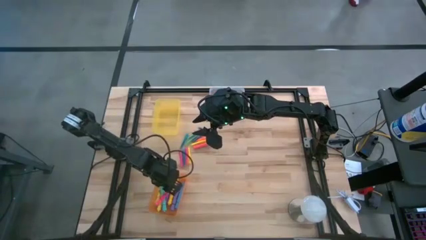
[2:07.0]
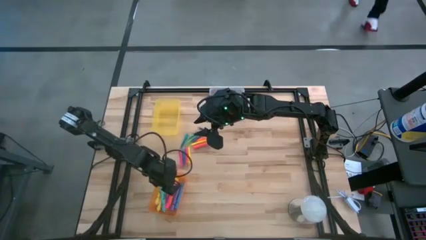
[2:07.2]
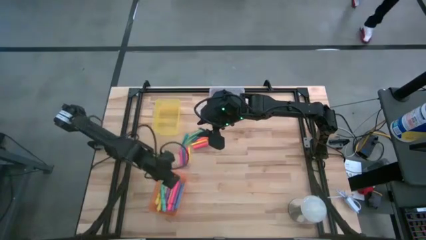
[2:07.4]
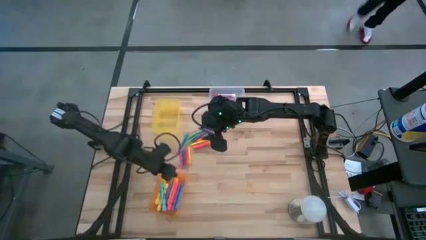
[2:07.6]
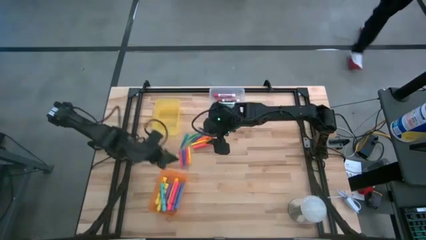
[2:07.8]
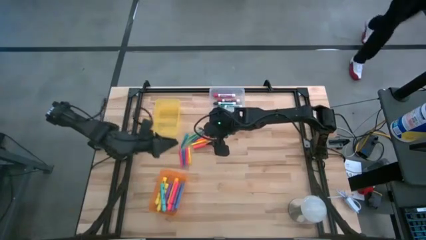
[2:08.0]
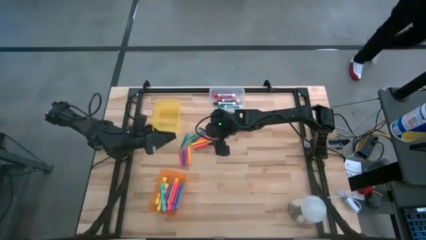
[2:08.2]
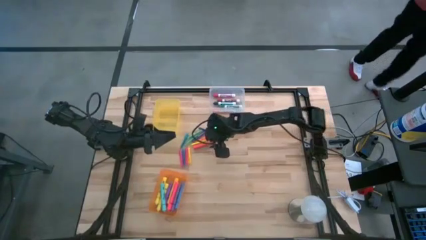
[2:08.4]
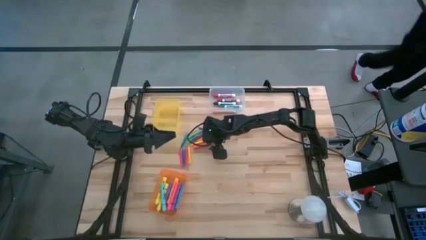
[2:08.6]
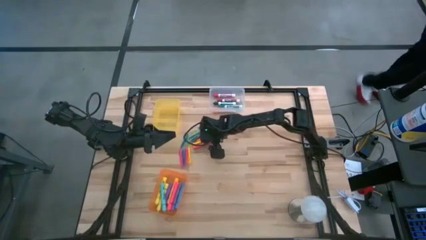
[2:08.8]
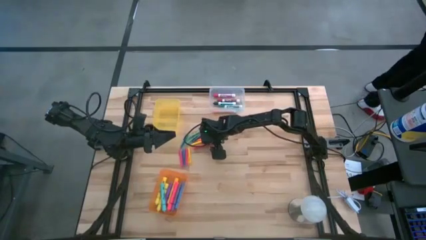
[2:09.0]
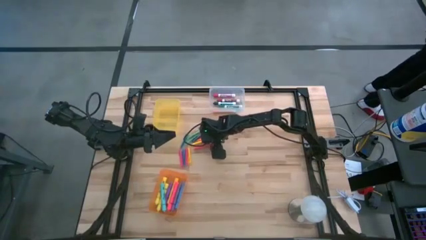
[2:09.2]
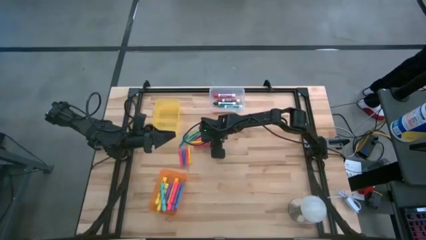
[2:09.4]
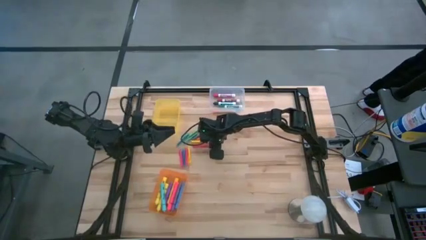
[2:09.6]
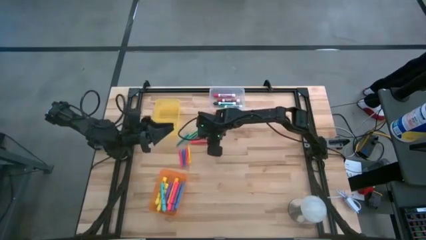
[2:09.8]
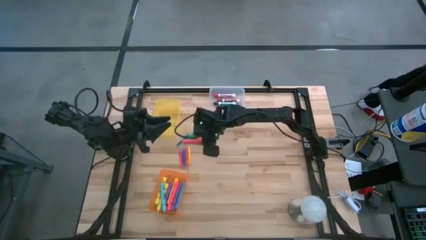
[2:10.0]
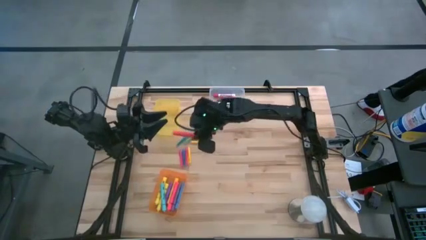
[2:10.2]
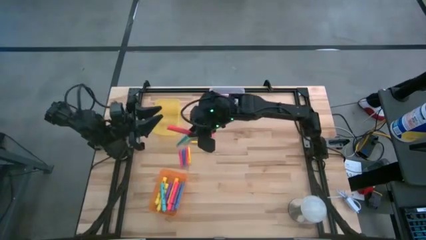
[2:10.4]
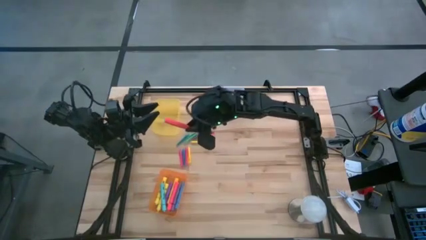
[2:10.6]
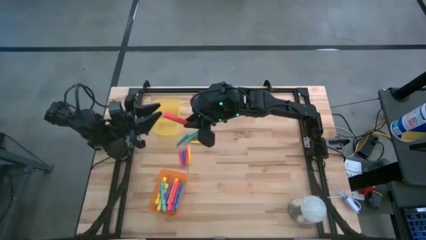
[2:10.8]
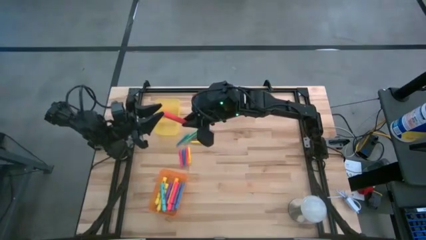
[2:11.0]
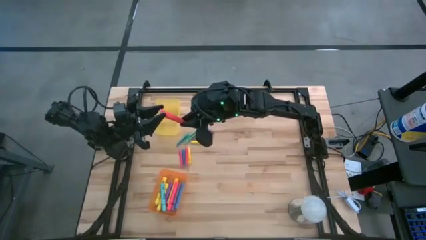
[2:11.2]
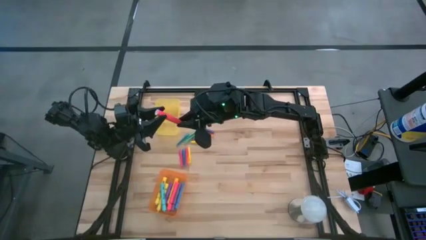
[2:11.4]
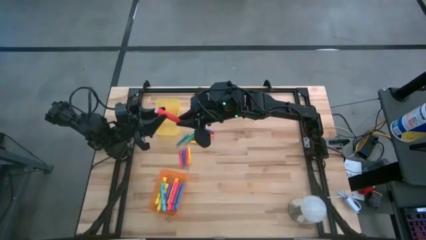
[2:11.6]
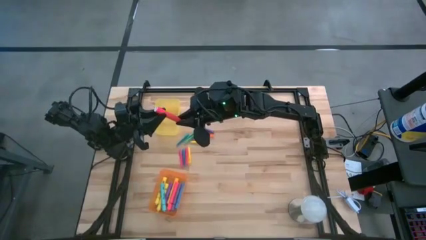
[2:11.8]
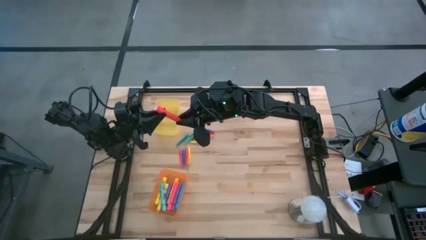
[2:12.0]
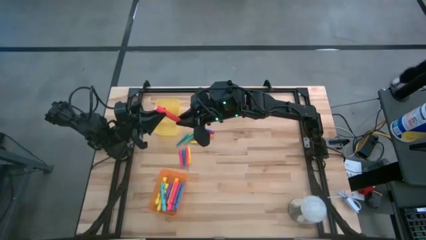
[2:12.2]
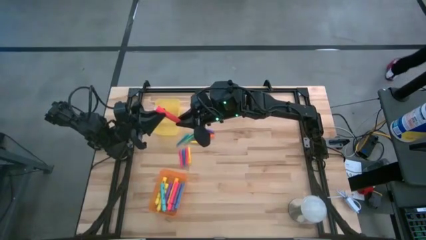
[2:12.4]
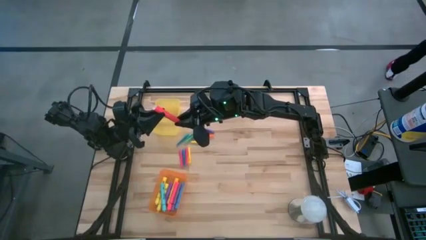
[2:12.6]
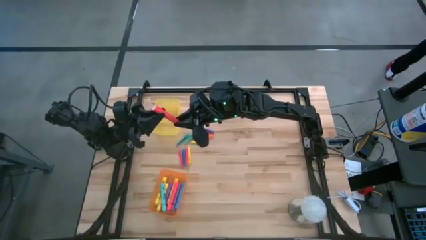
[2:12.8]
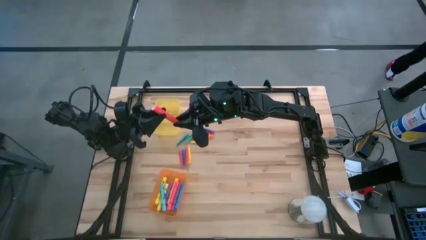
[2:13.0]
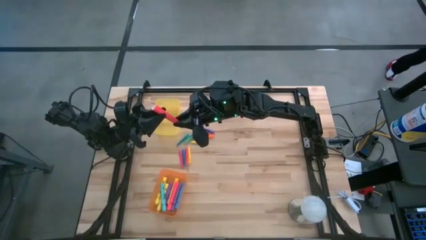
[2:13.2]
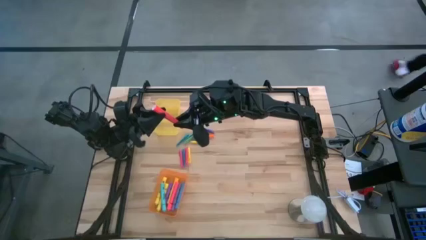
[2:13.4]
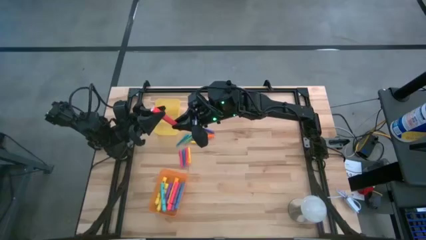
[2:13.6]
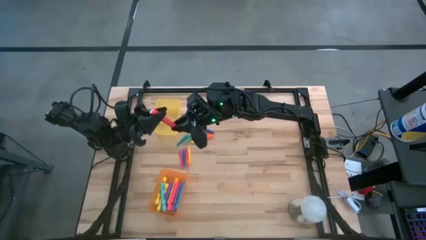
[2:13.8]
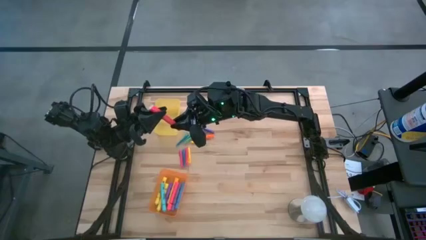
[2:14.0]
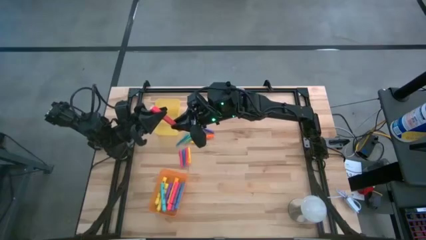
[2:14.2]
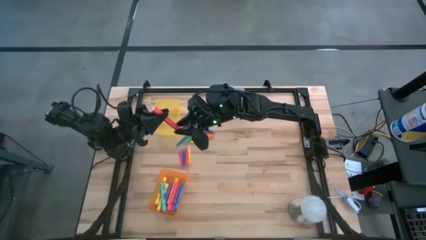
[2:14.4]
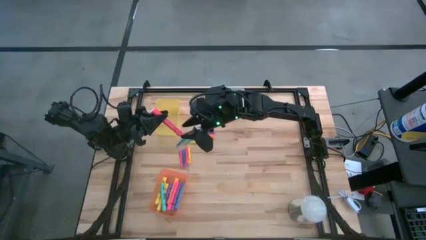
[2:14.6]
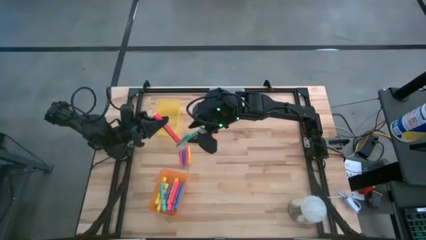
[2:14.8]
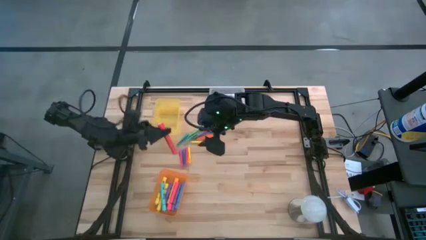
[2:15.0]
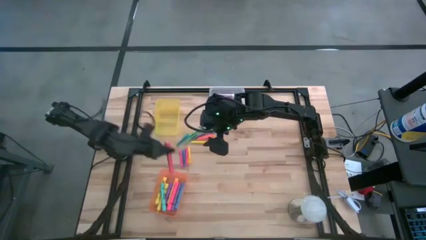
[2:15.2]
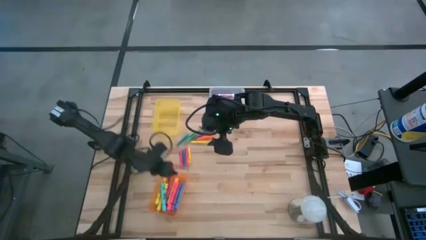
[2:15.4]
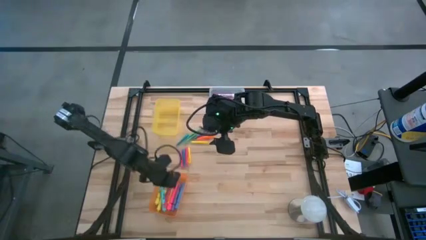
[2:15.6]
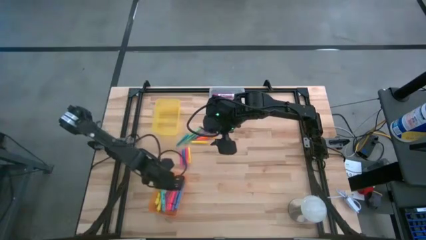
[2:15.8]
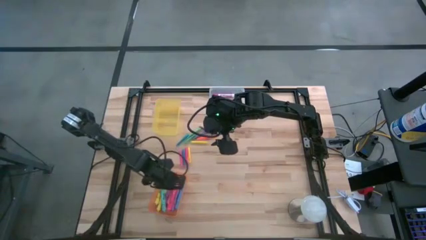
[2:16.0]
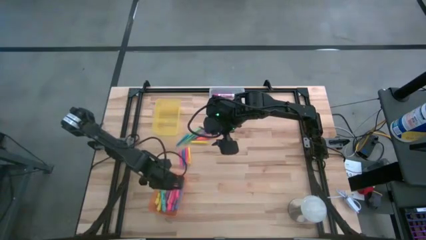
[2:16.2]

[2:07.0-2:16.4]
Task: Pick & Place Markers
Put the red highlighter into the orange bin

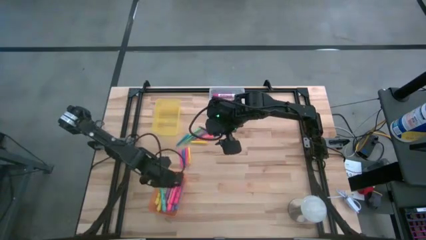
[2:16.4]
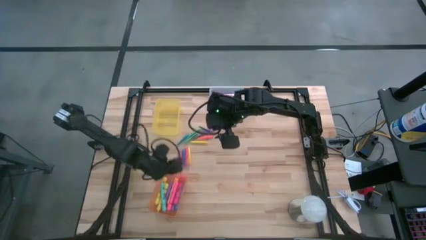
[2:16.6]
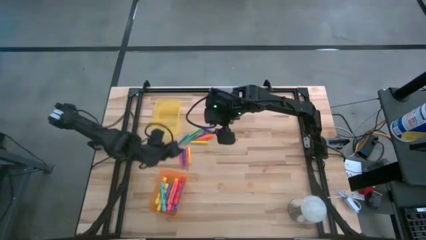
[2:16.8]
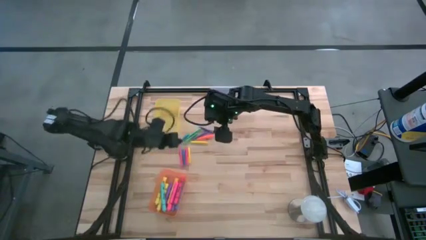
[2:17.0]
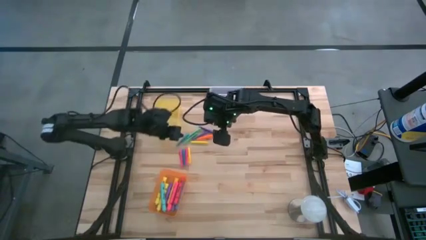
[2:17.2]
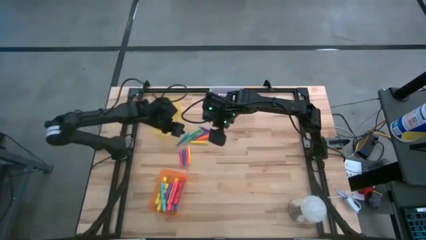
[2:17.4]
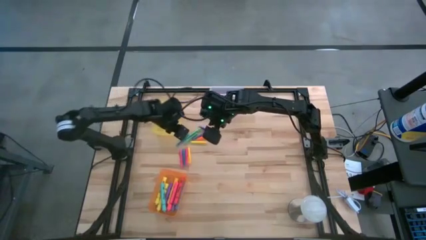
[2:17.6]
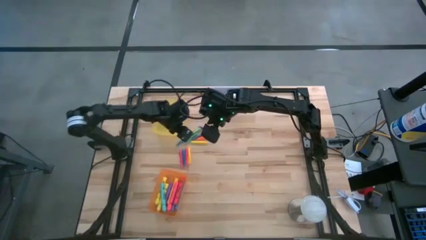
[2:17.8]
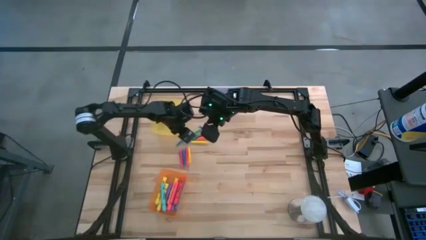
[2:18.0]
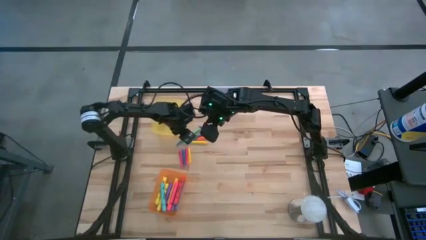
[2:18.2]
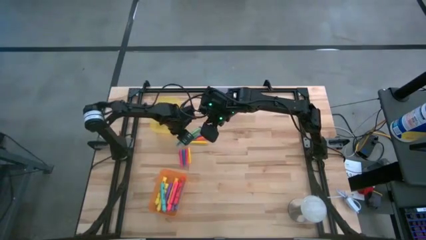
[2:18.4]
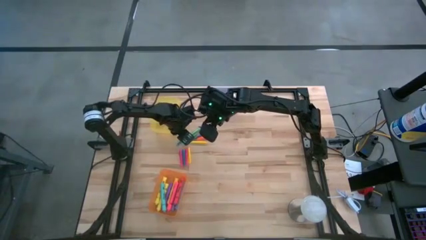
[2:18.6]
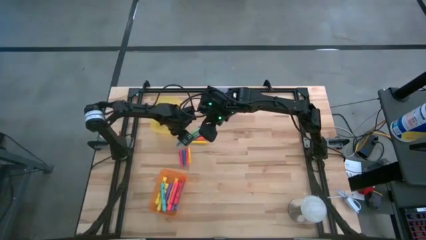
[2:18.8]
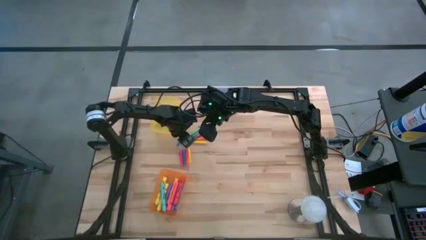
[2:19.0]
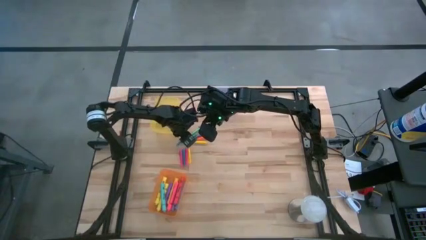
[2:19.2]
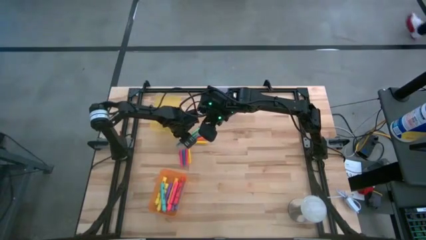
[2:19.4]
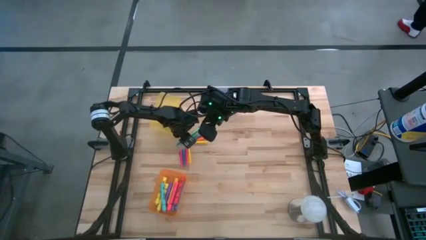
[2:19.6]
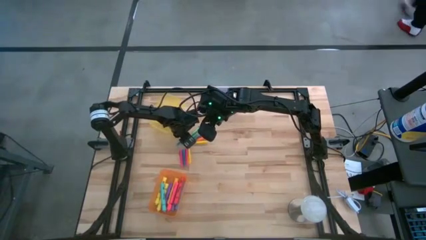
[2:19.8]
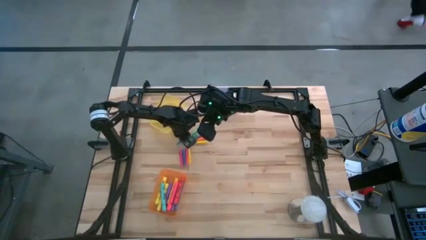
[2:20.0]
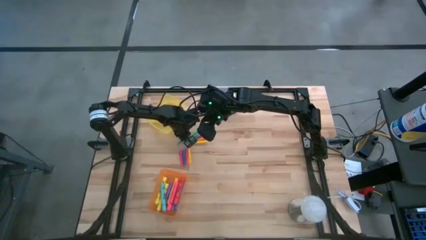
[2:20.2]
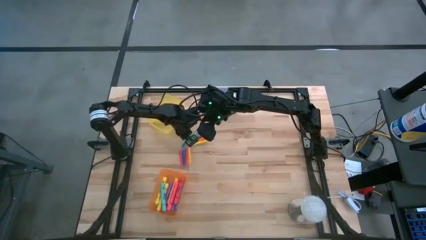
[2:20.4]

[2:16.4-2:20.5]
Put the top blue pen into the yellow bin
